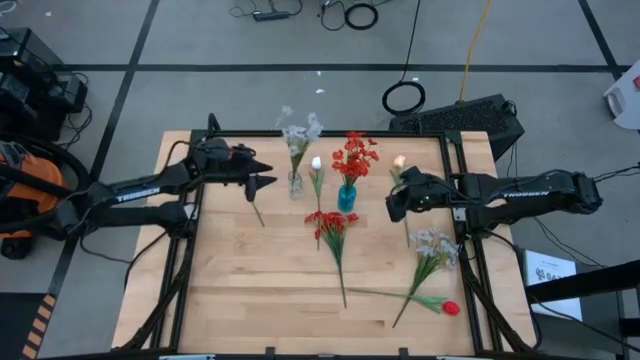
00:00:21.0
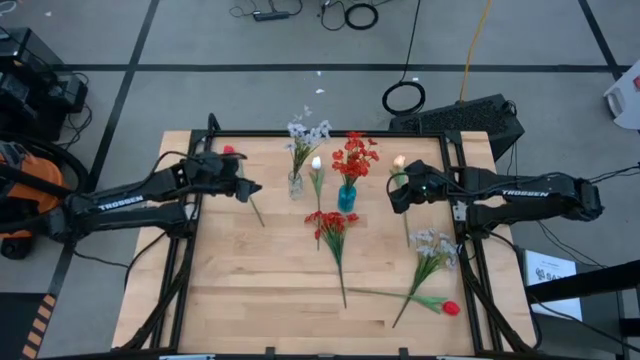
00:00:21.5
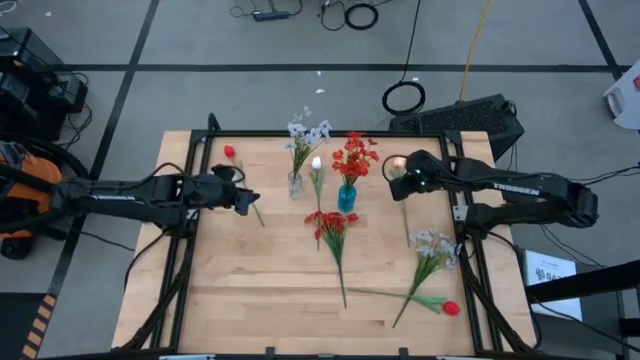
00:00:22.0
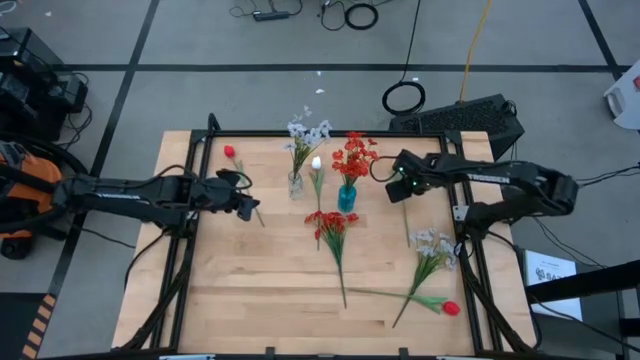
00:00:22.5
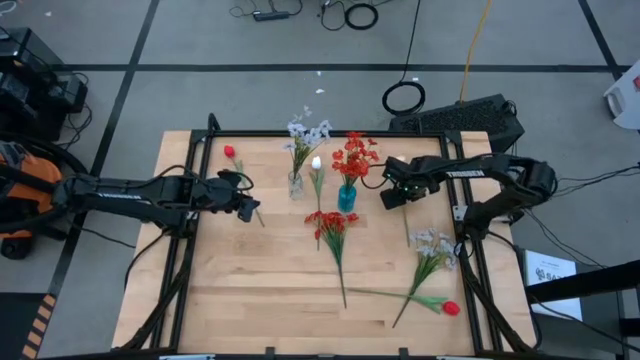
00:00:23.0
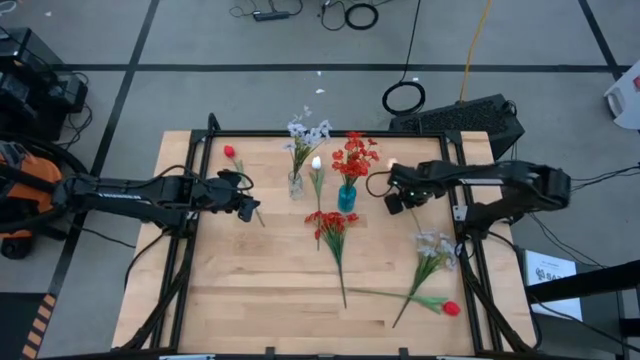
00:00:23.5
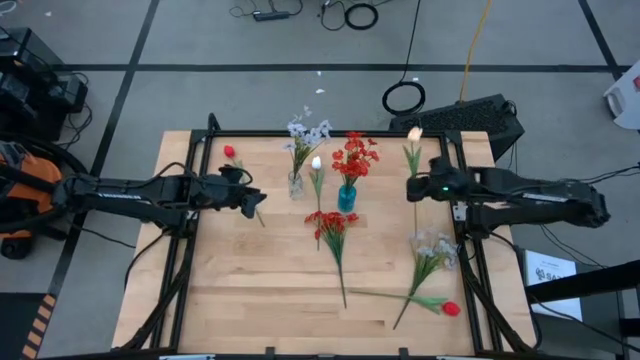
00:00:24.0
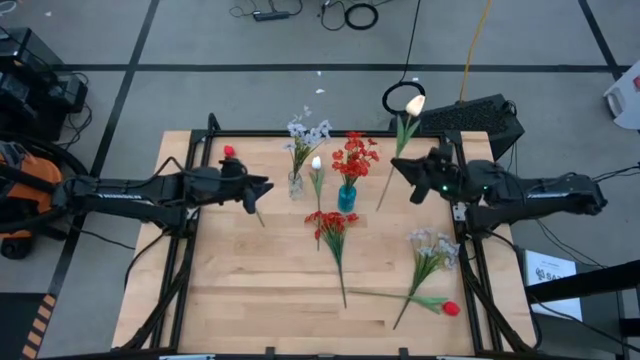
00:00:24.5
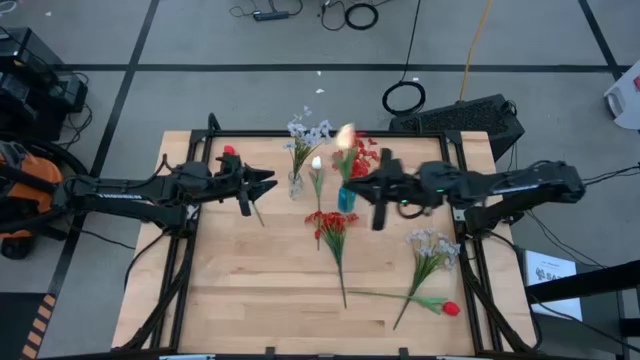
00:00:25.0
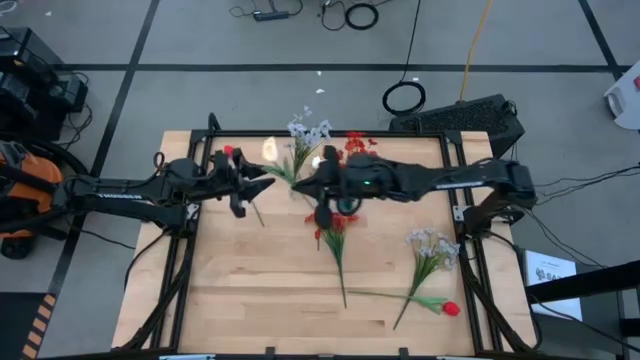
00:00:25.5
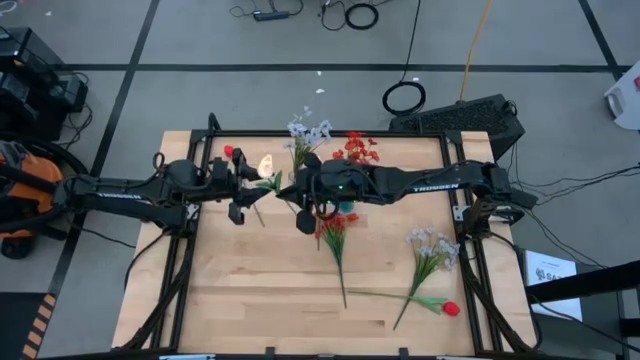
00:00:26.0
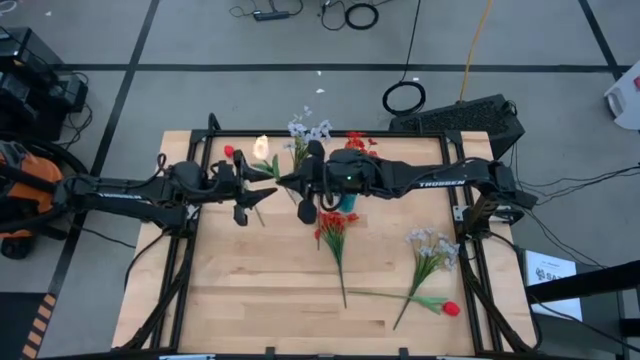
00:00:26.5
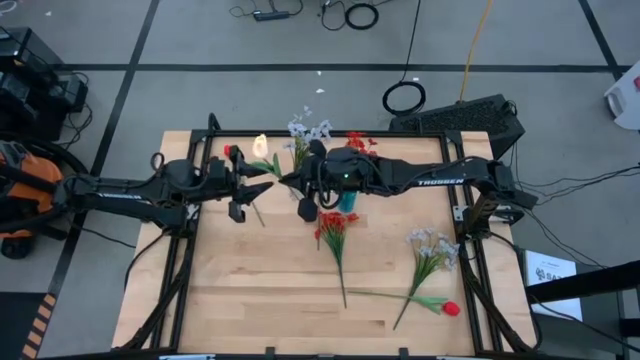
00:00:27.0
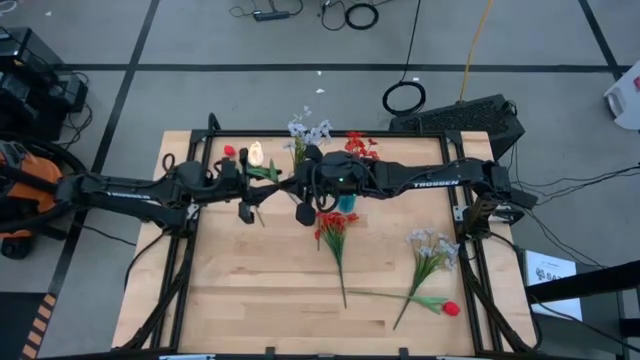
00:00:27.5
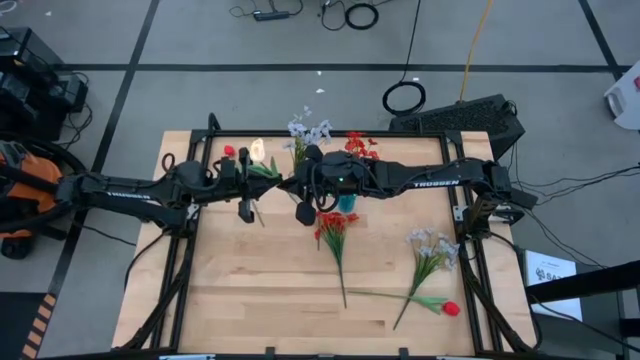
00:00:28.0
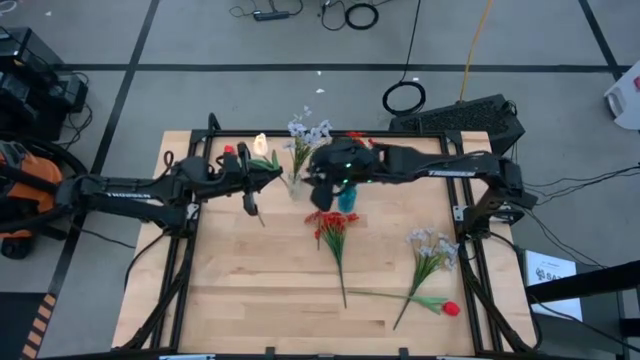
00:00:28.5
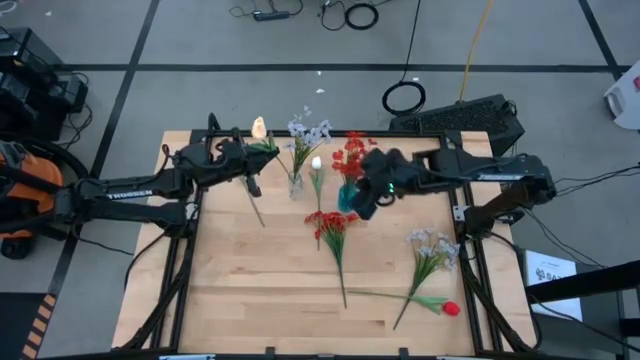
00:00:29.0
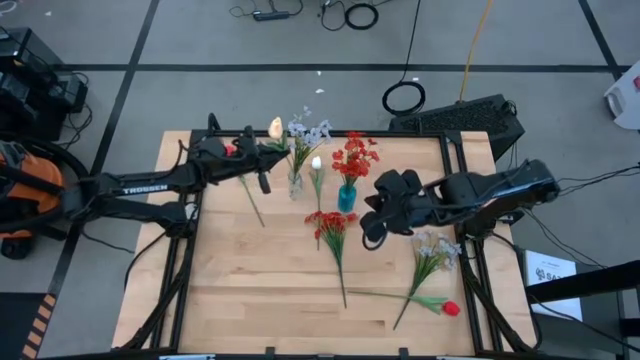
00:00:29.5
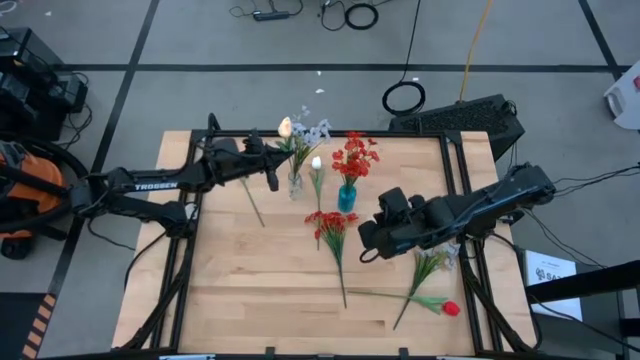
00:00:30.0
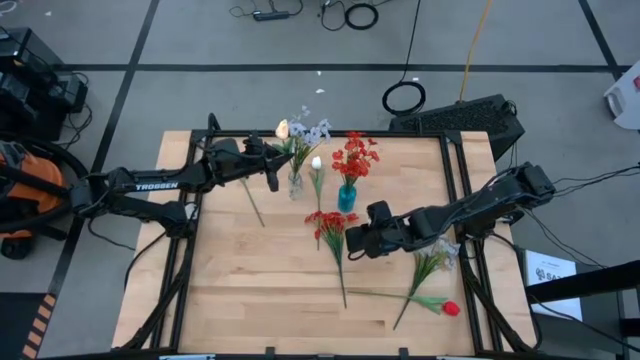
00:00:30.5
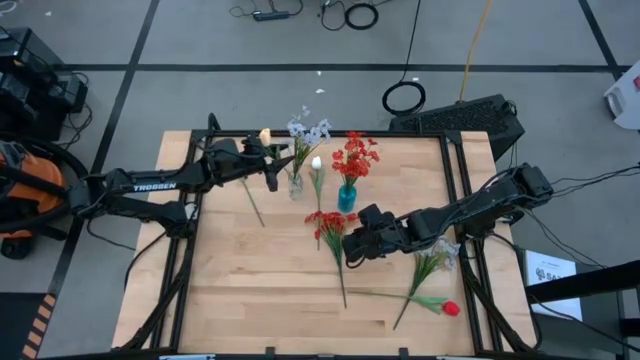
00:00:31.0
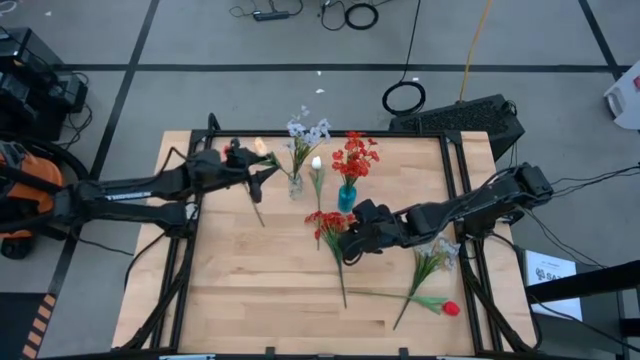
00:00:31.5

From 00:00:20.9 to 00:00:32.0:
Task: Sort flowers into vase by color
Put the yellow tulip into the transparent vase

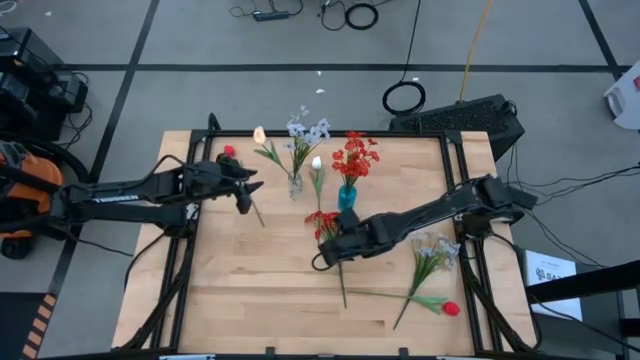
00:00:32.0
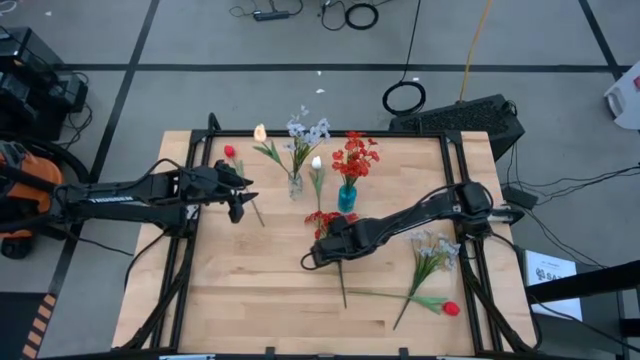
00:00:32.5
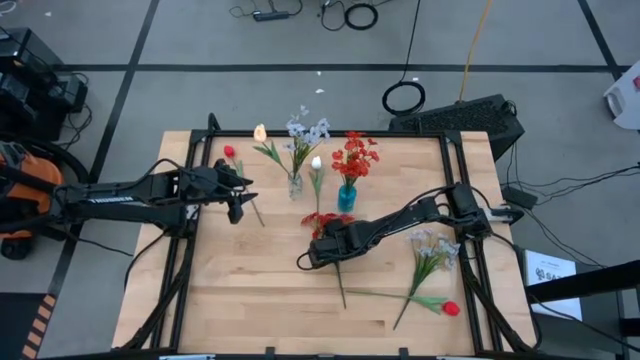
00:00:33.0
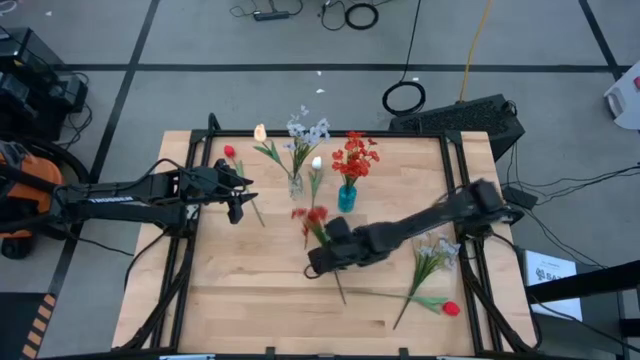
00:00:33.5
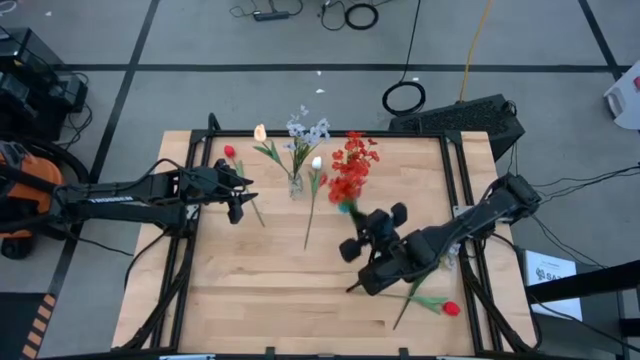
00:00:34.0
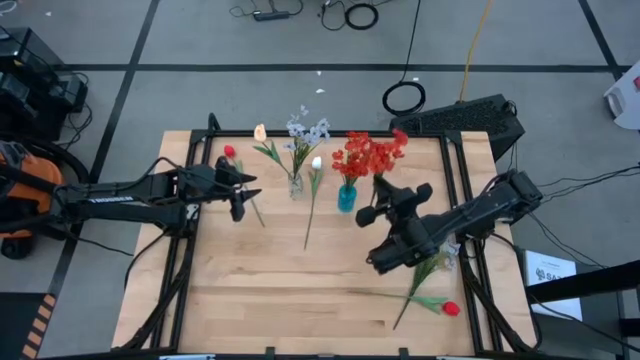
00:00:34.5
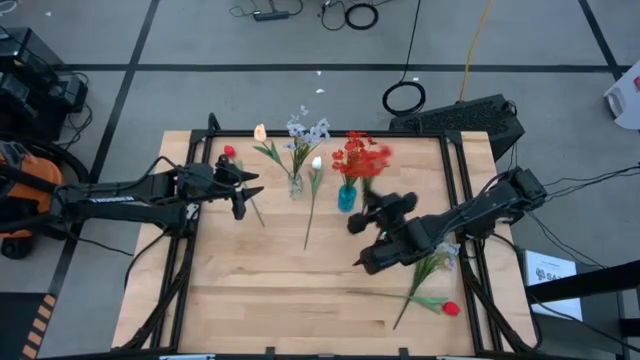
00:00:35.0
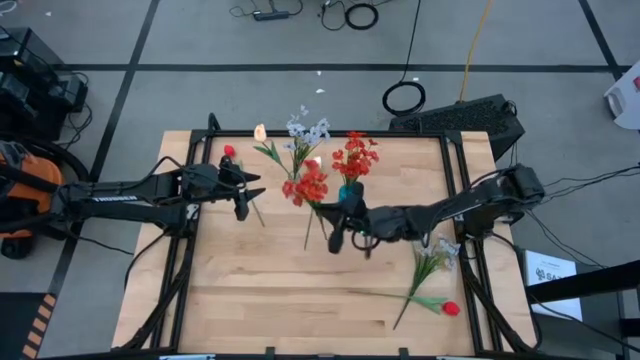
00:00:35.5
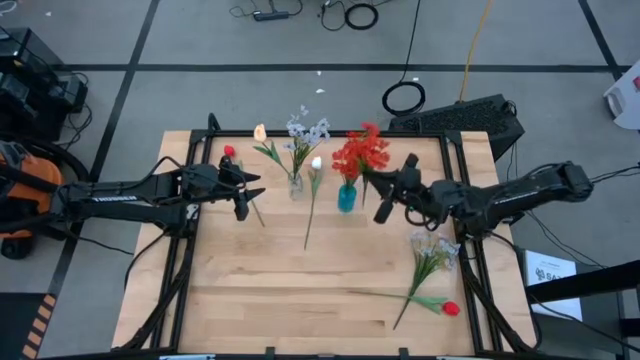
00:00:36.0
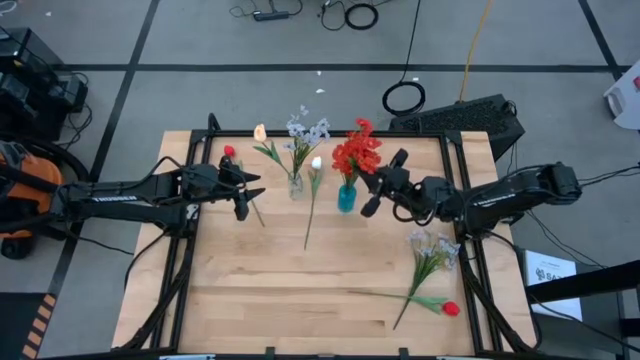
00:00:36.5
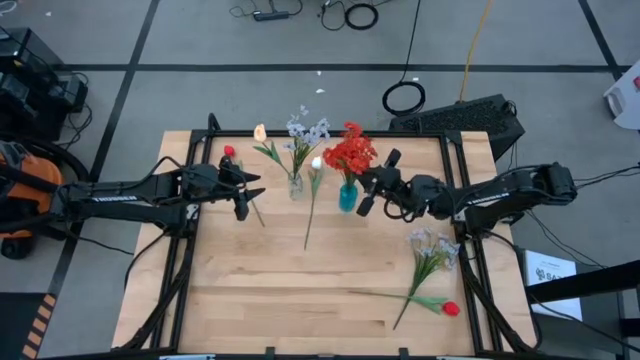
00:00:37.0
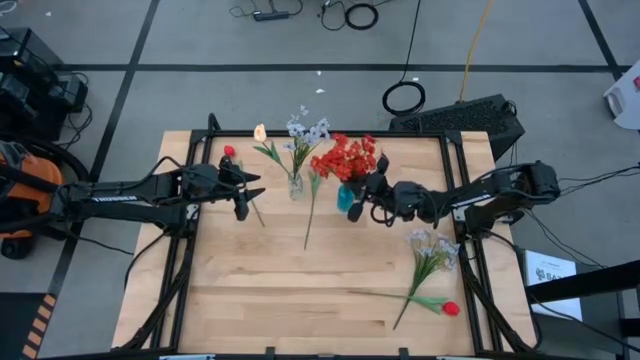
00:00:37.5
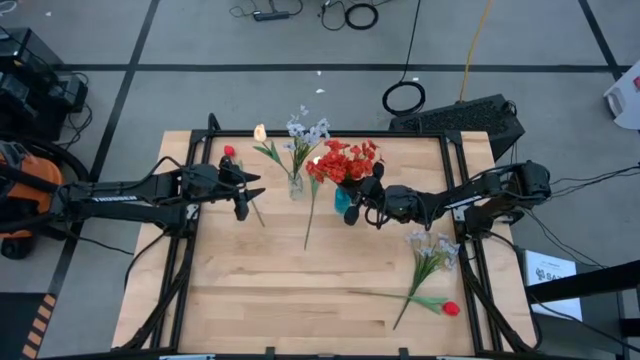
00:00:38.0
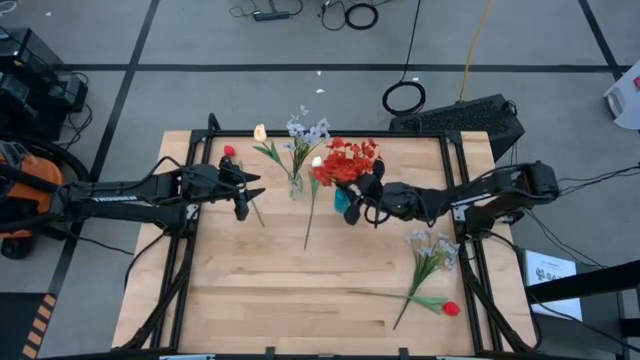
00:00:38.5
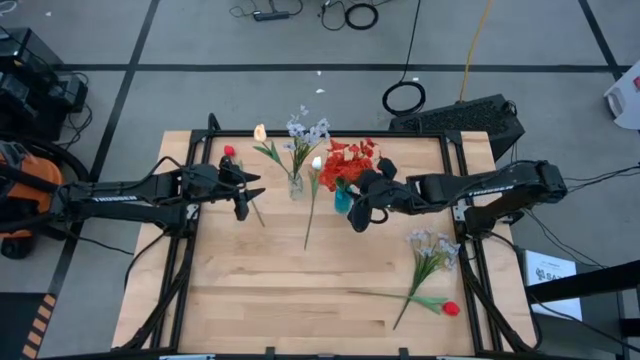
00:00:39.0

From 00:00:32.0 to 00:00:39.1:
Put the red flowers into the blue vase

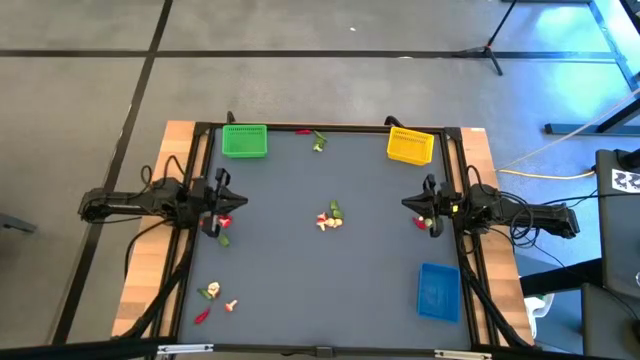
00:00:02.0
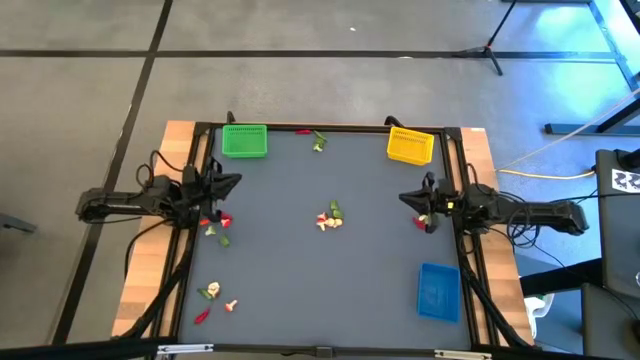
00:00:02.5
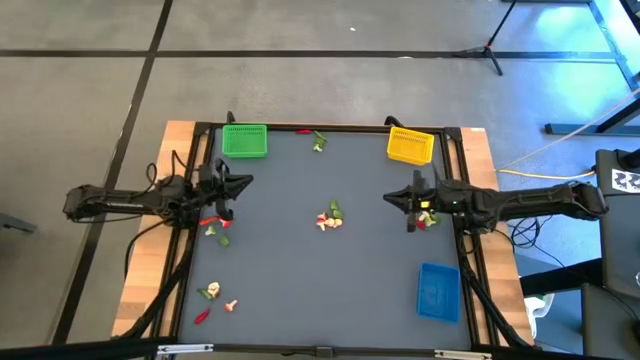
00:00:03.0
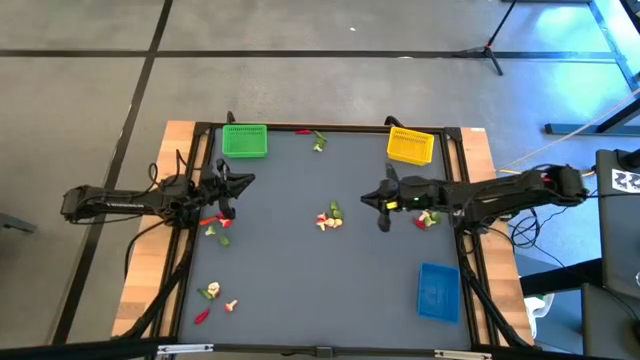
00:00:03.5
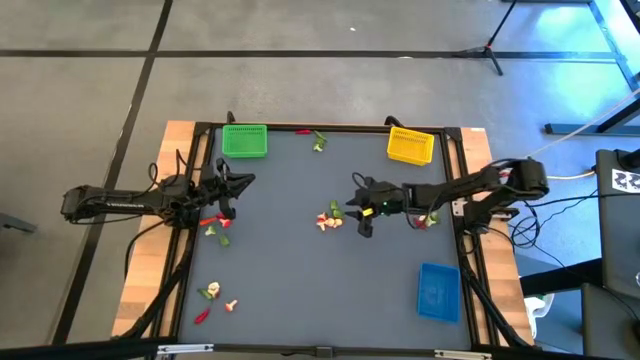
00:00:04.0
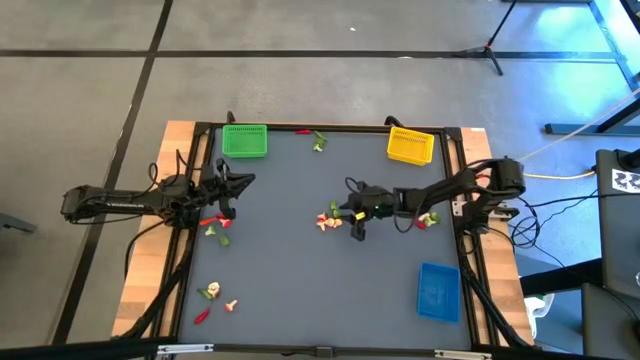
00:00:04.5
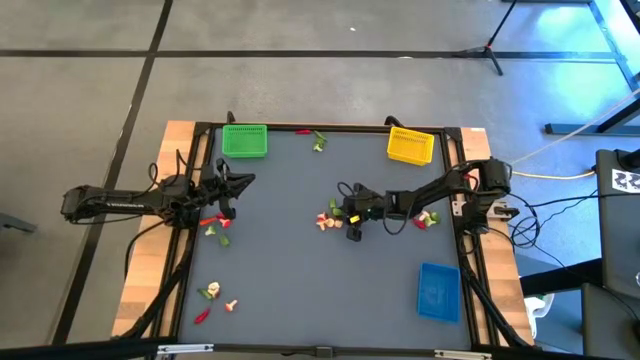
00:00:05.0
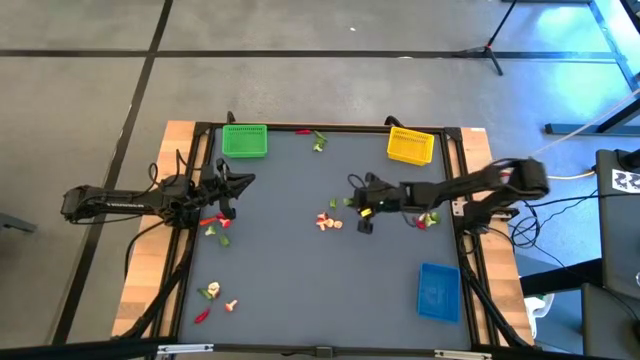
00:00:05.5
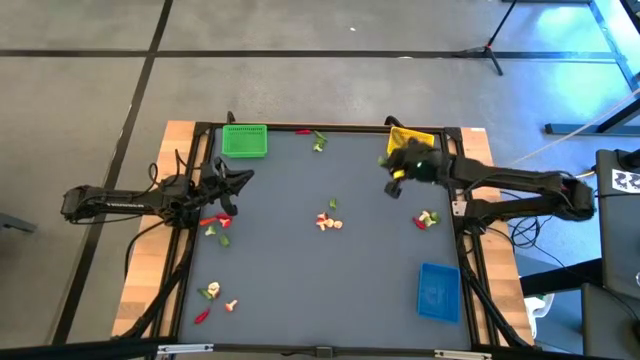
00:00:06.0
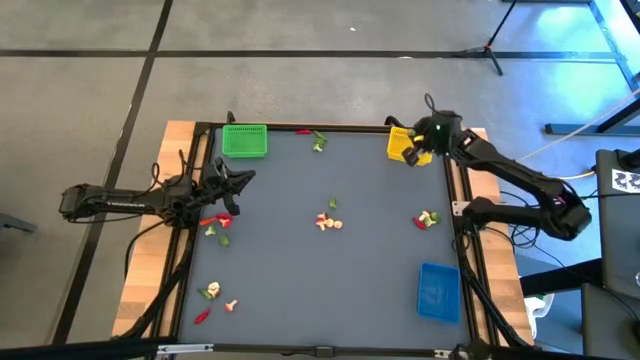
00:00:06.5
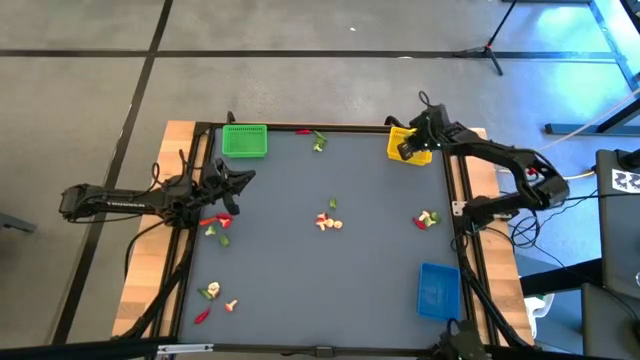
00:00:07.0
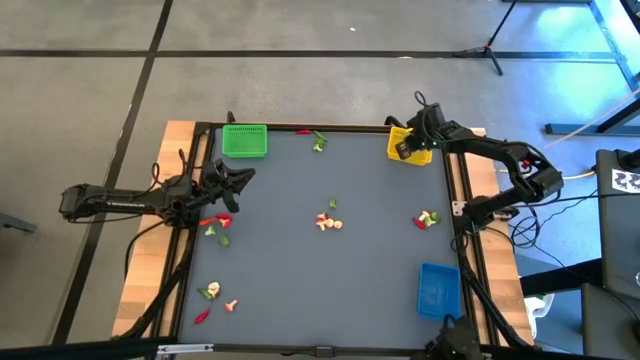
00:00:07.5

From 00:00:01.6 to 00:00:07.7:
Task: Sort produce into baskets
Put the green chili pepper into the yellow bin
